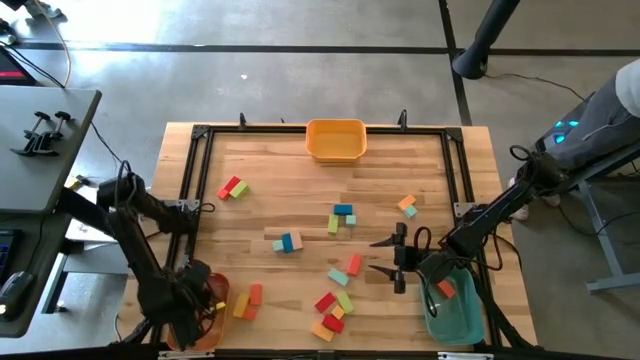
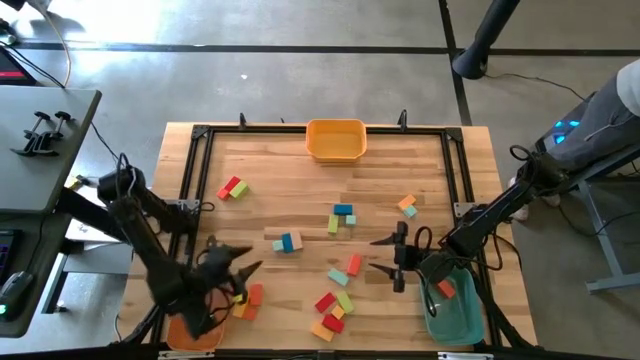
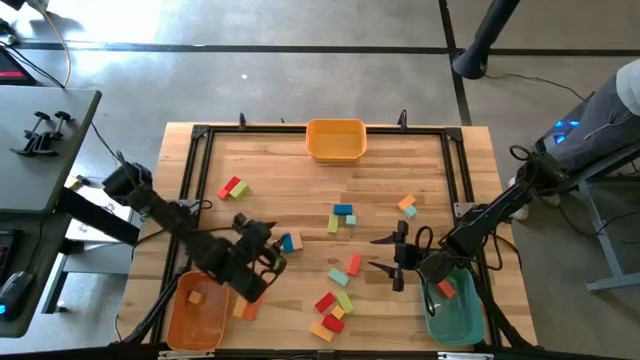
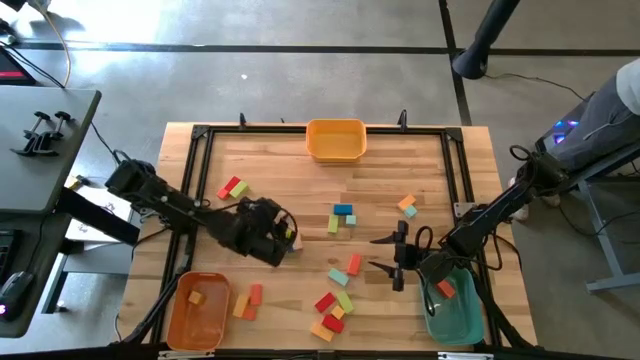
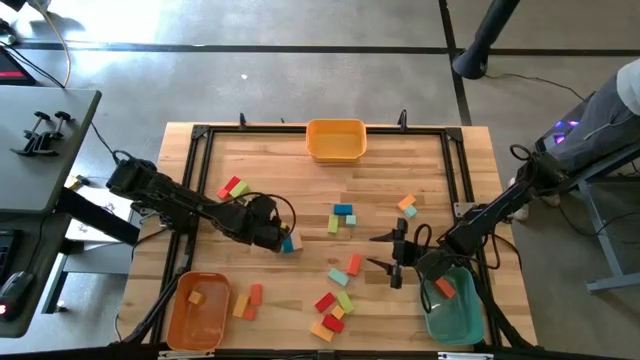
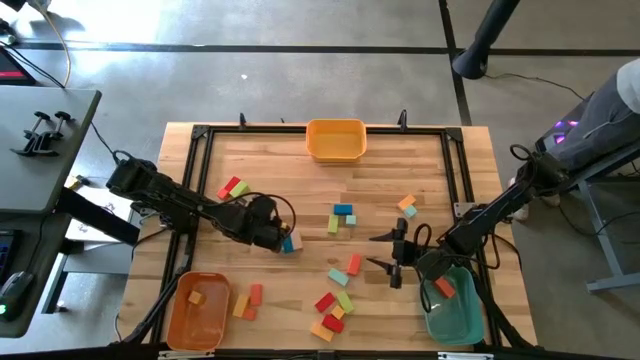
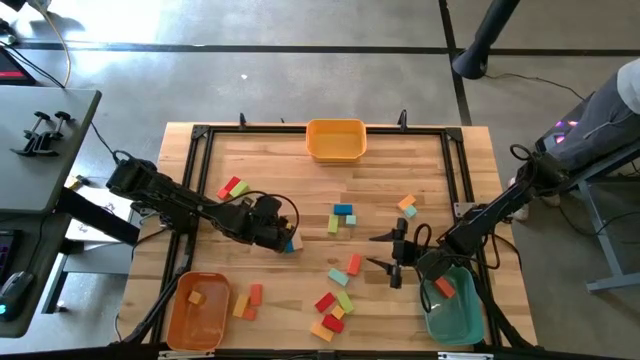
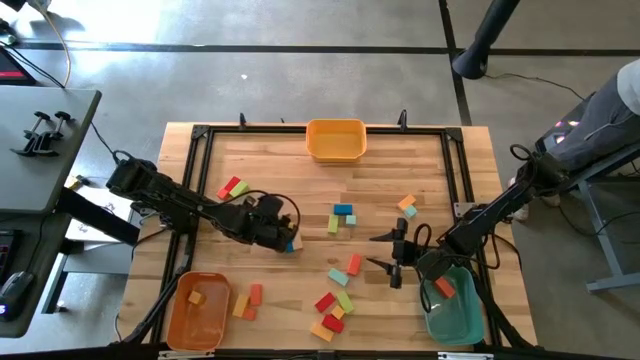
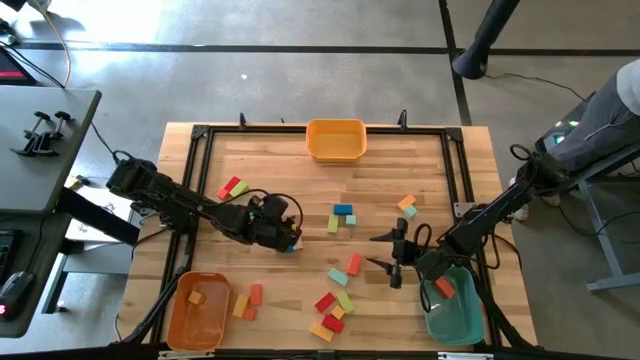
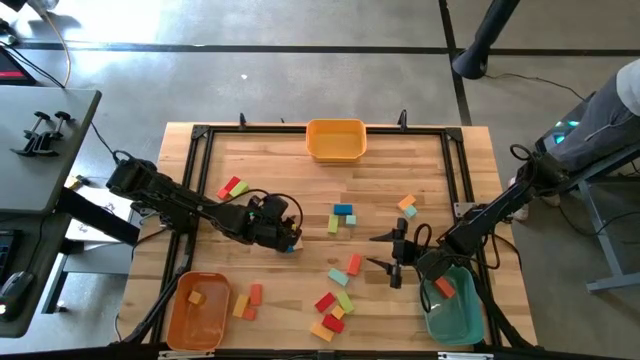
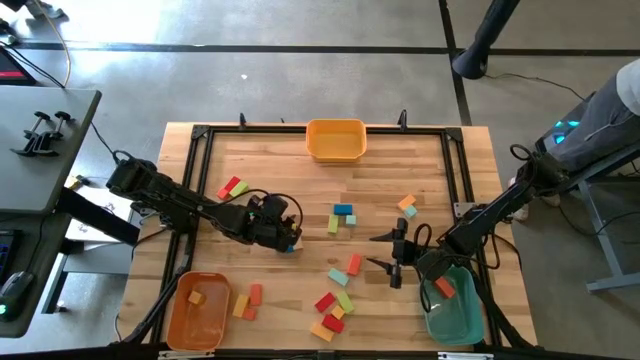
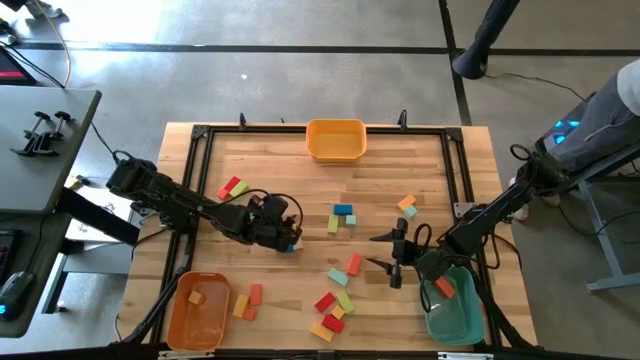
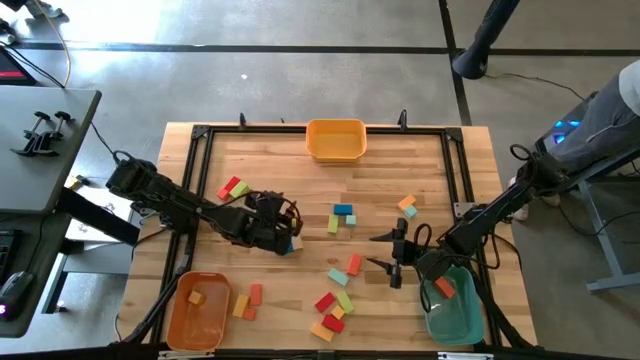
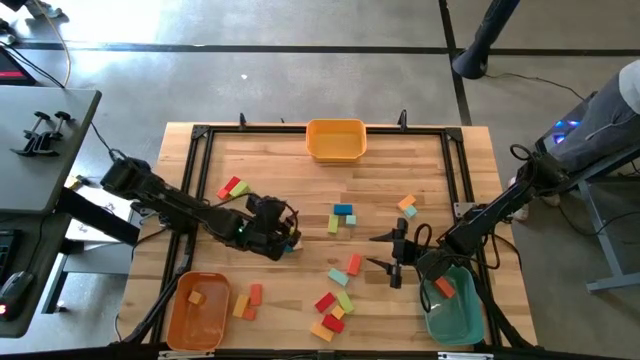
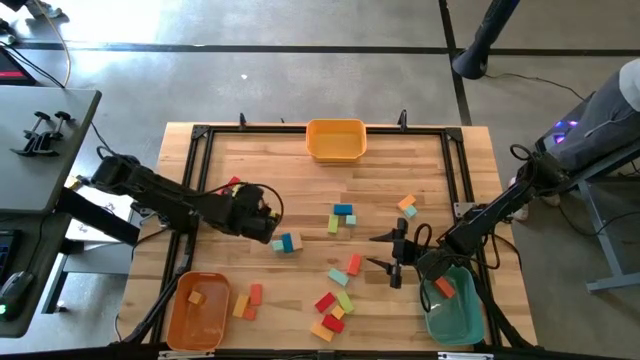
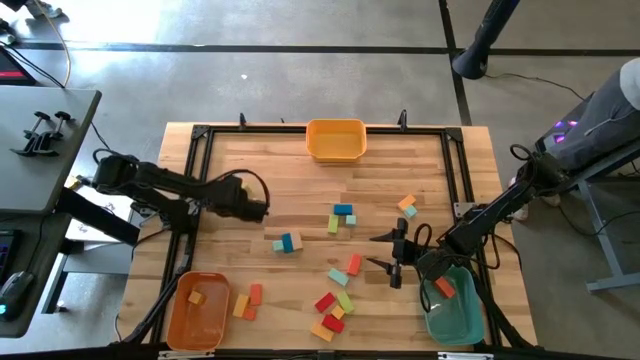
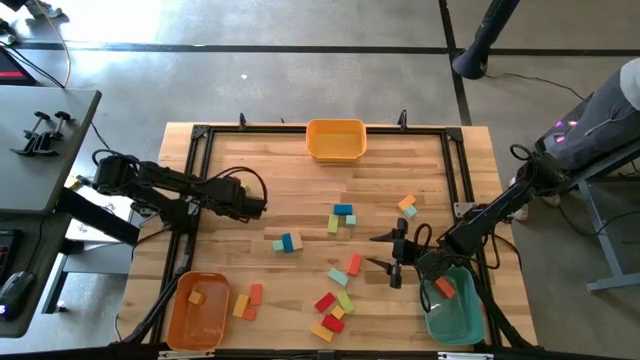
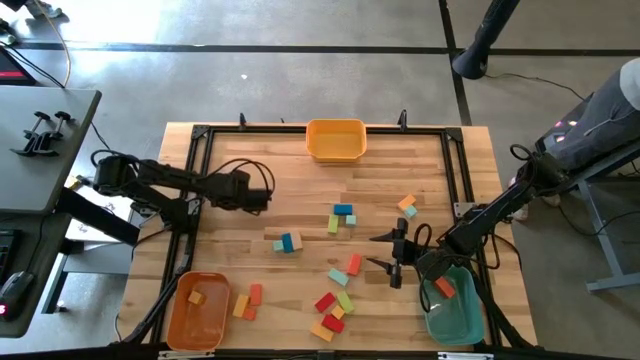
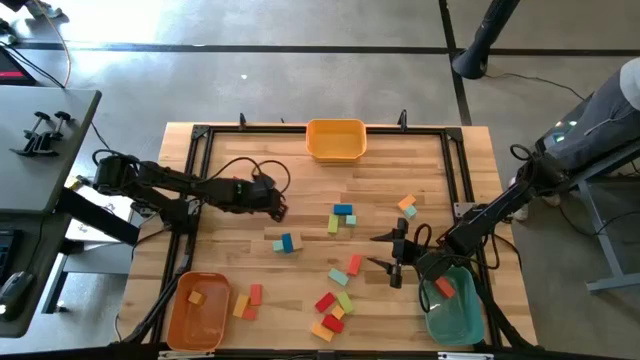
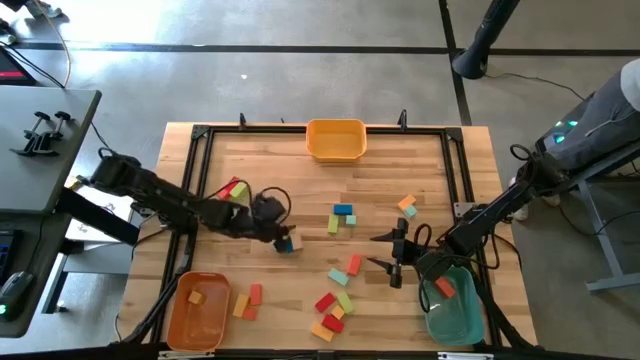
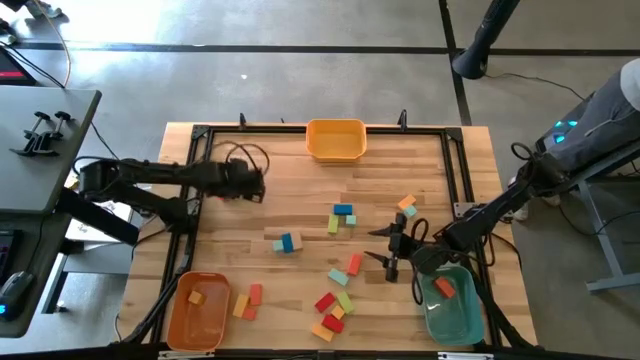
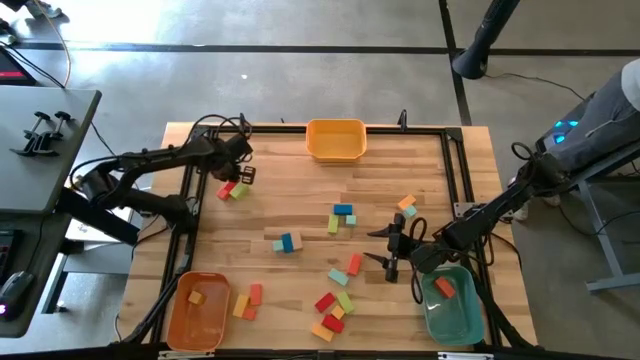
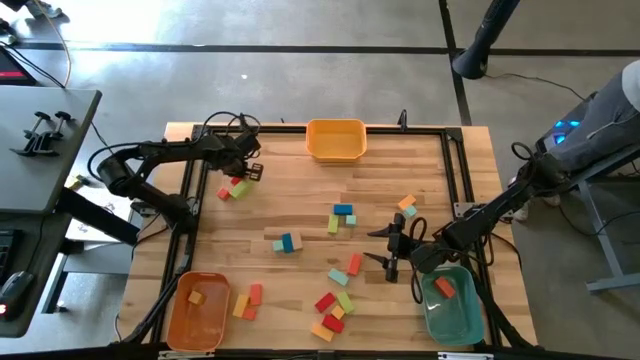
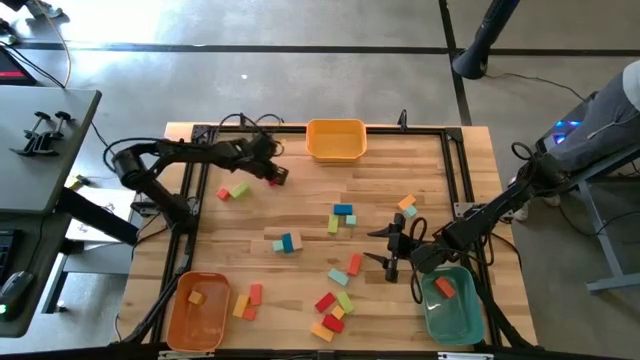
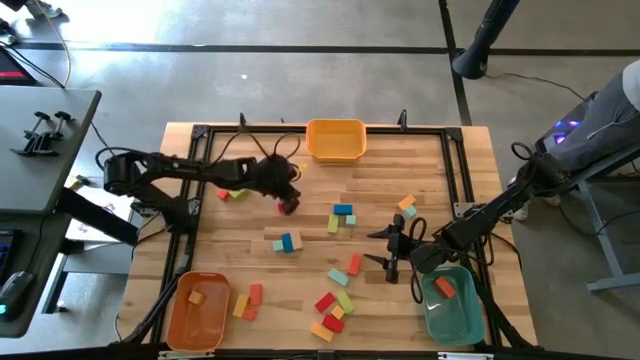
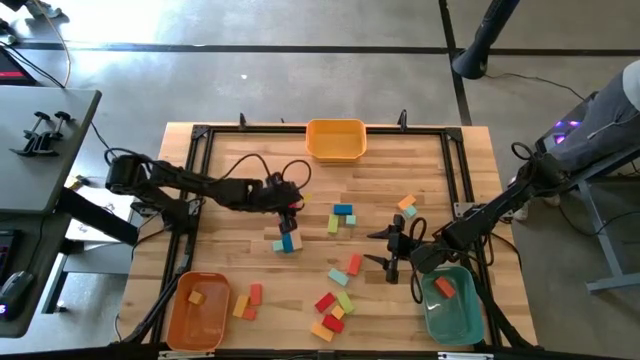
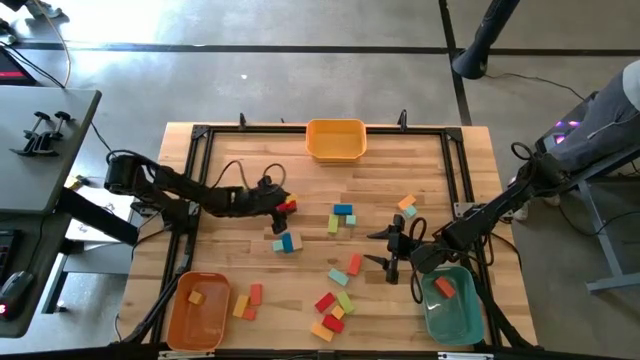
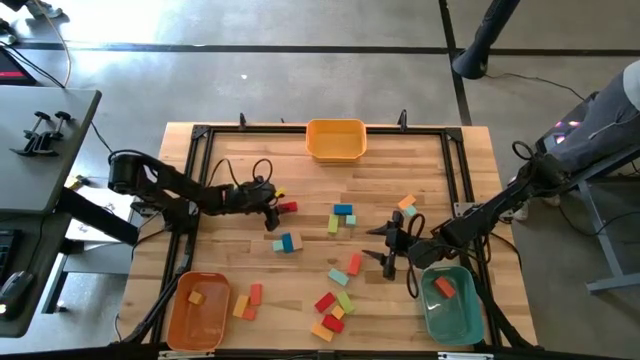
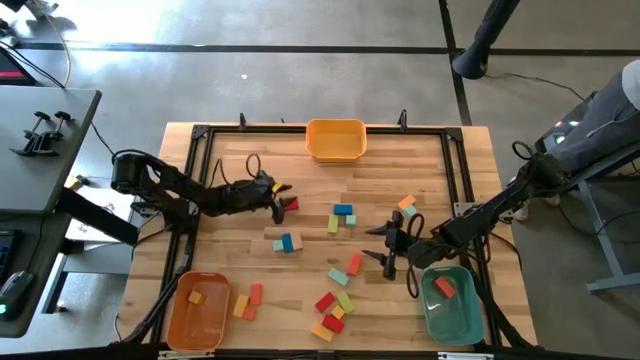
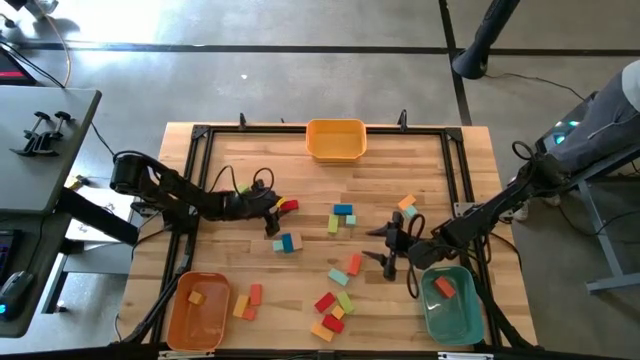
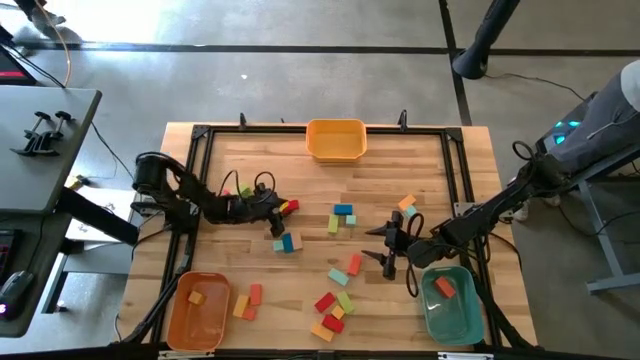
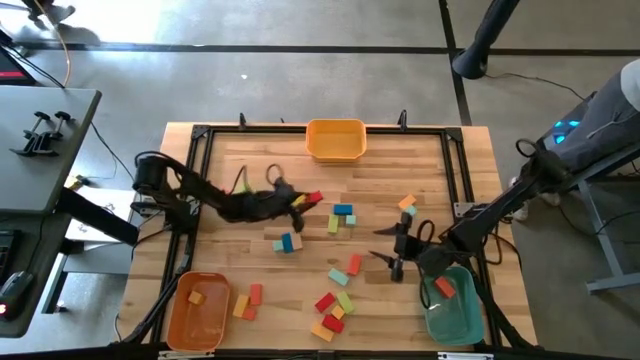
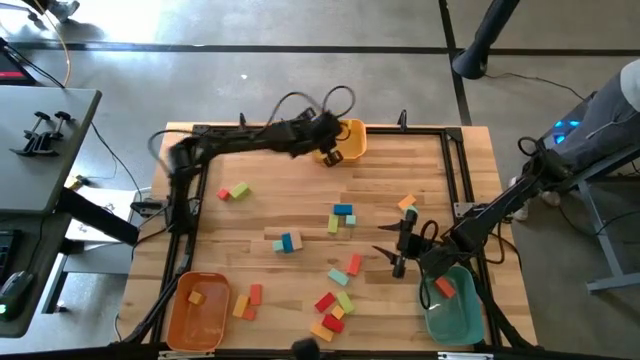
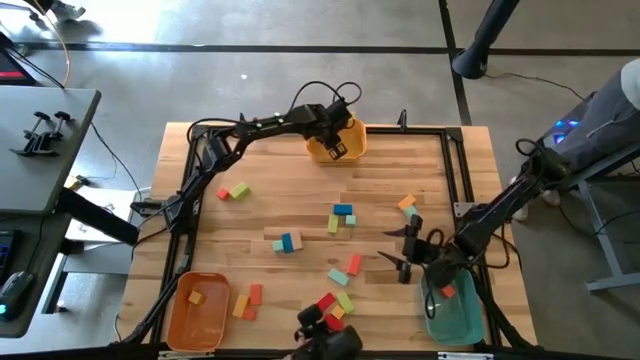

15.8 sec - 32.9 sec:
Task: Sort blocks by size
Put the small red rectangle block into the yellow bin

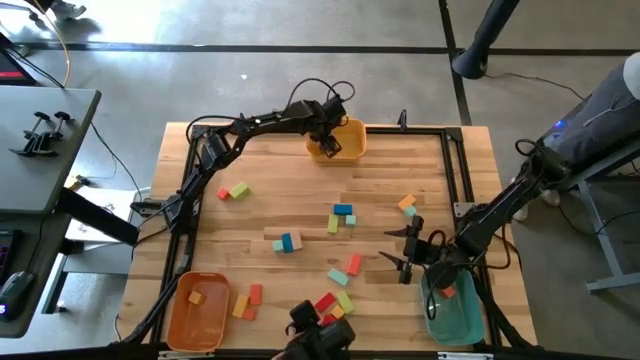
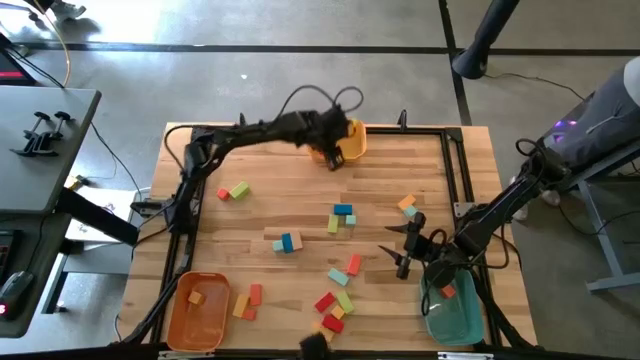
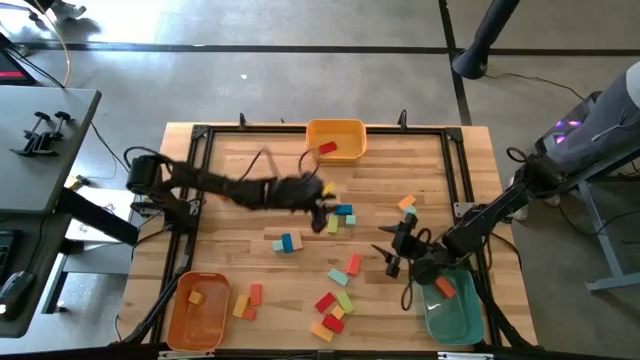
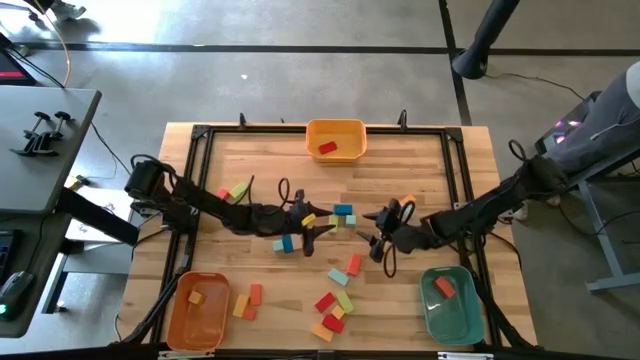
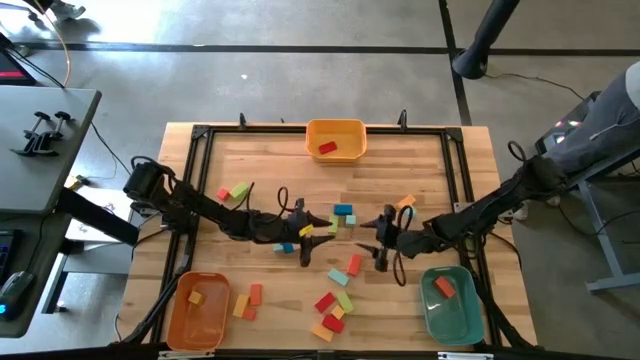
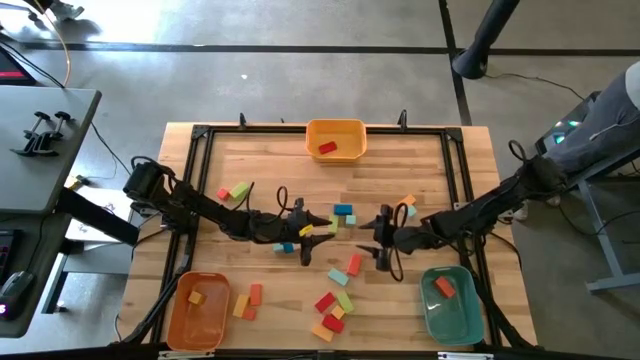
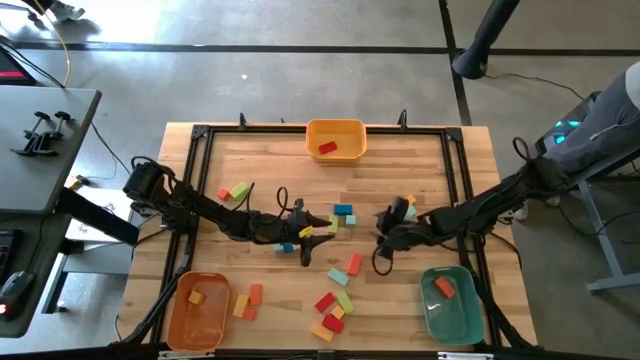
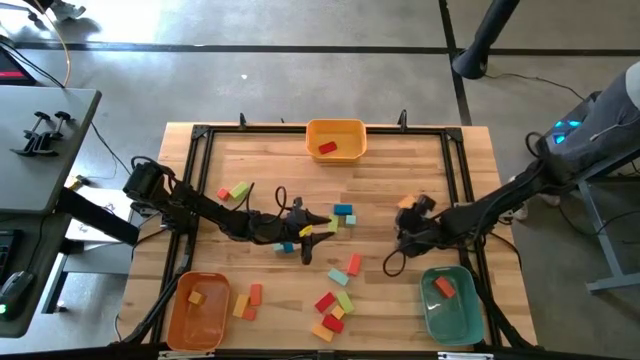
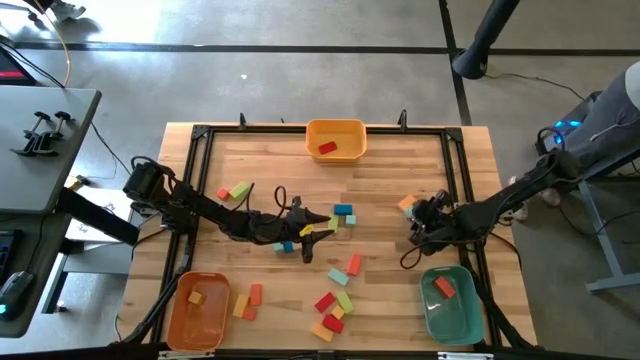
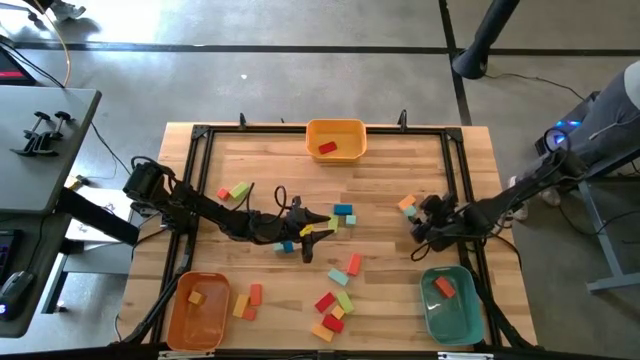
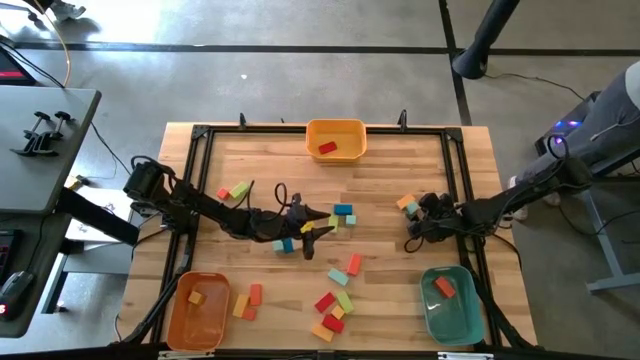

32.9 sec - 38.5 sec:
Put the light blue square block into the orange bin
